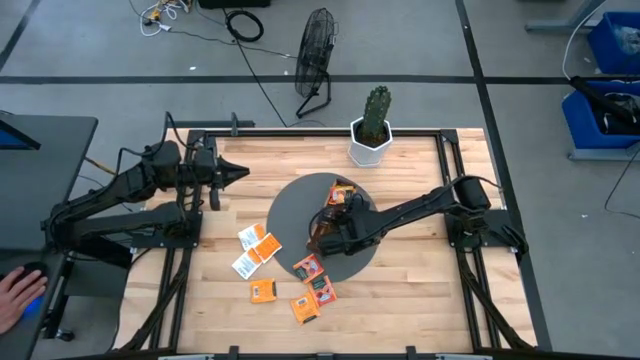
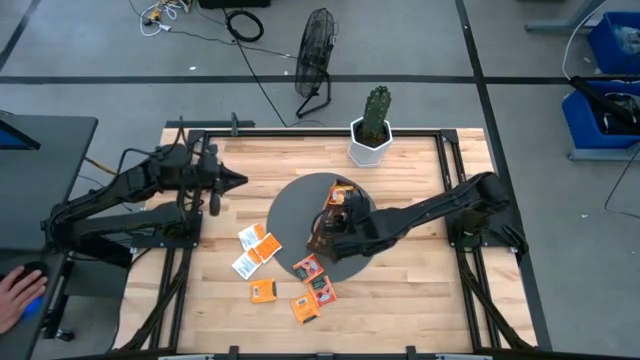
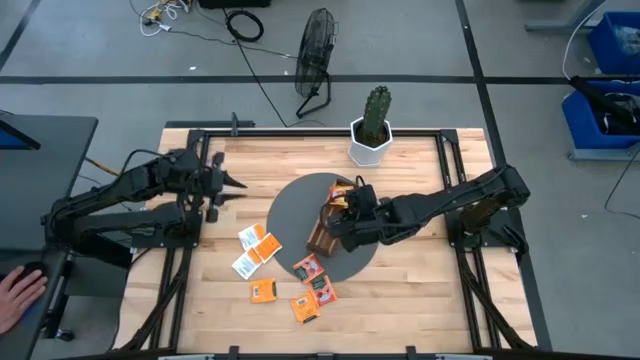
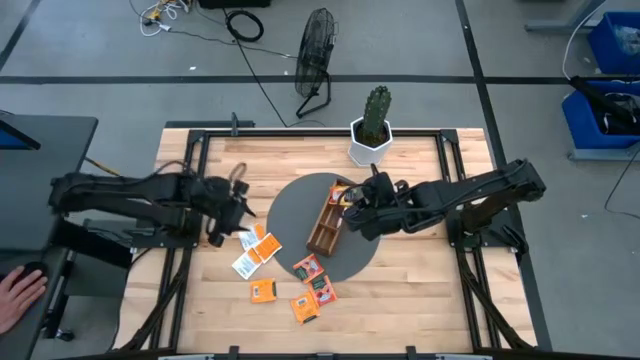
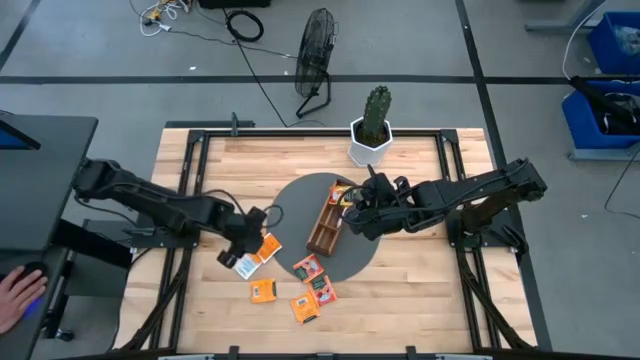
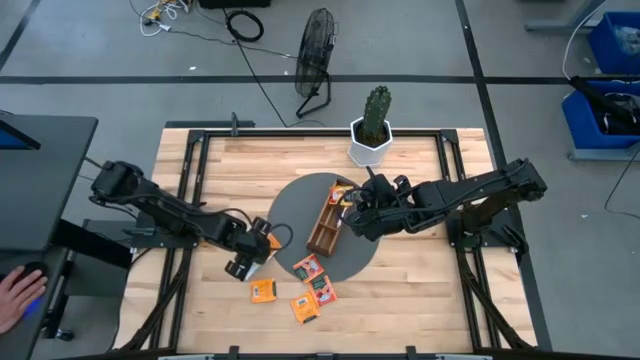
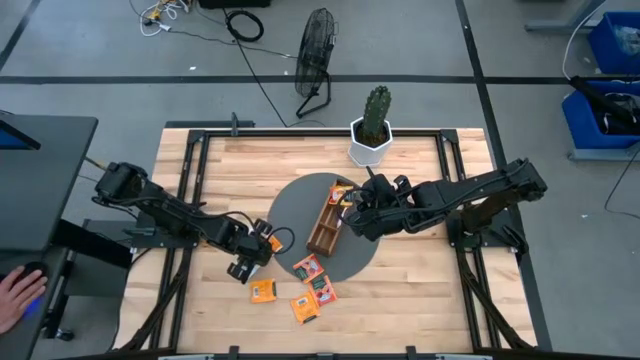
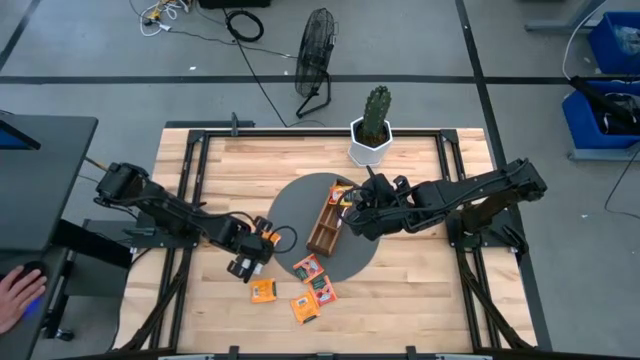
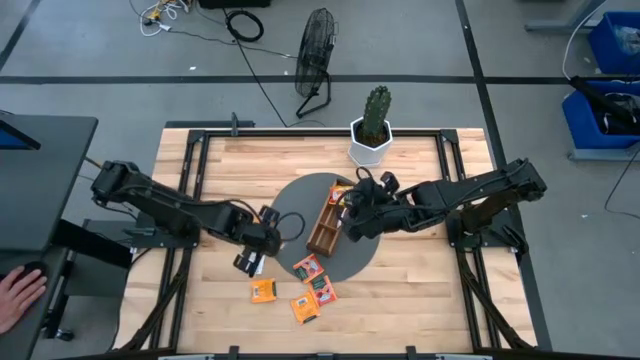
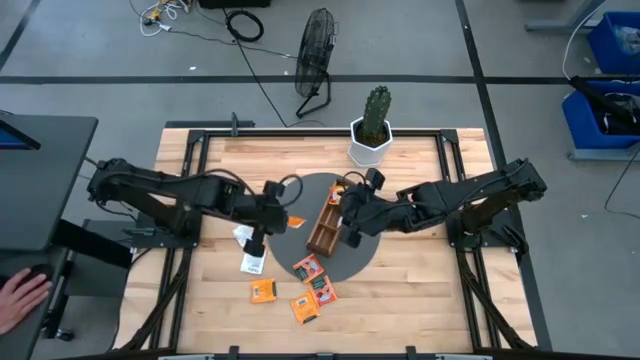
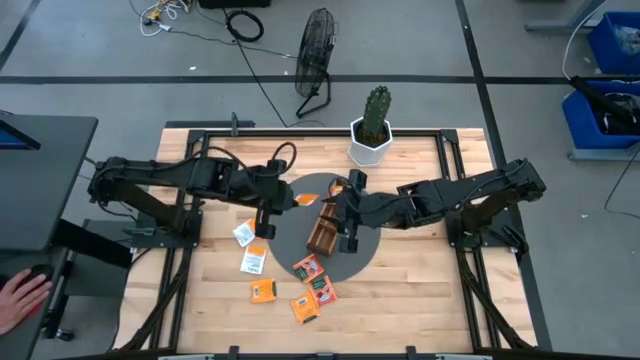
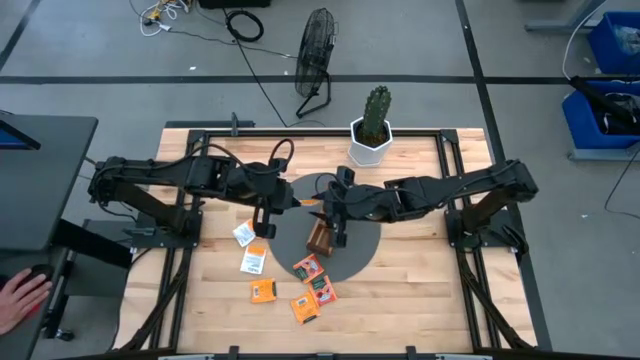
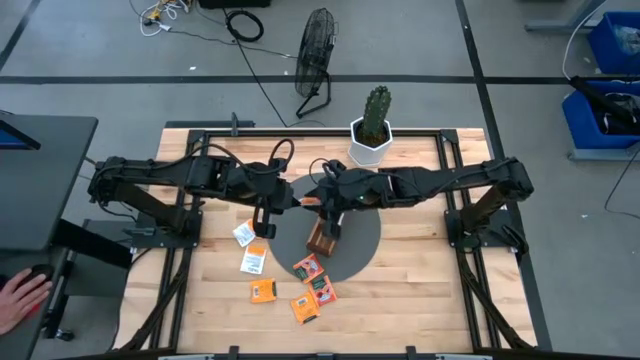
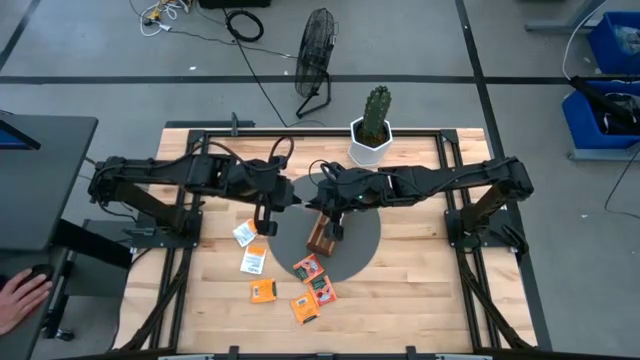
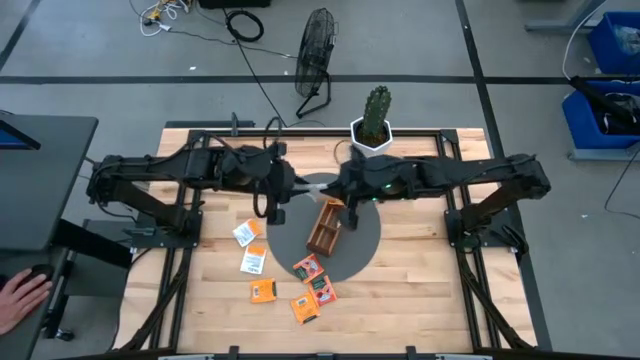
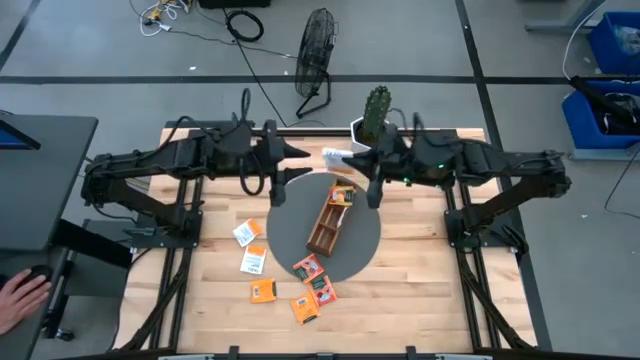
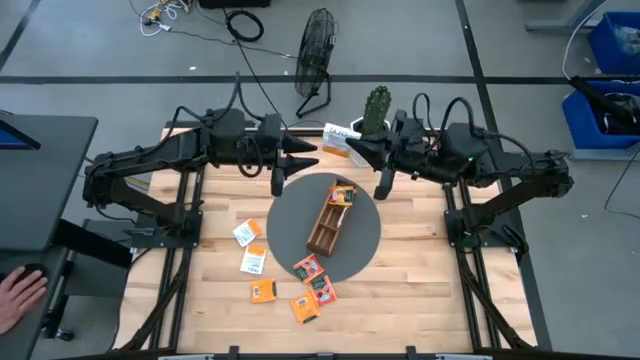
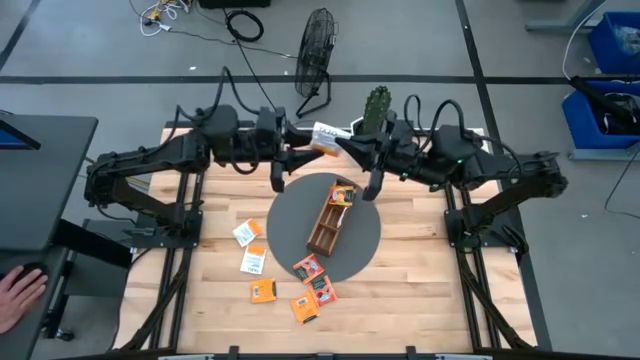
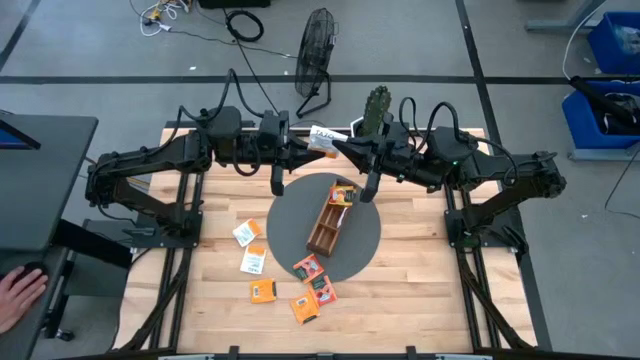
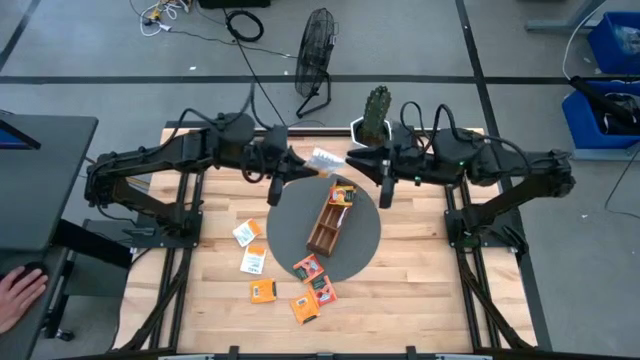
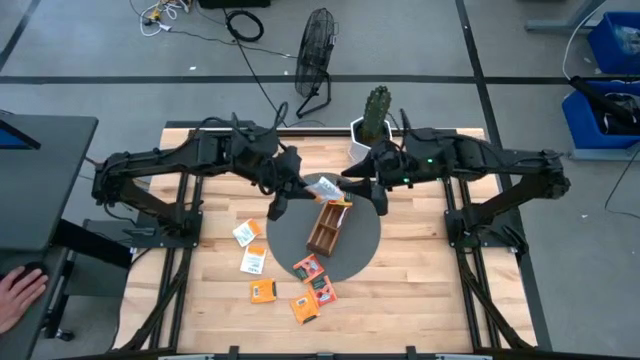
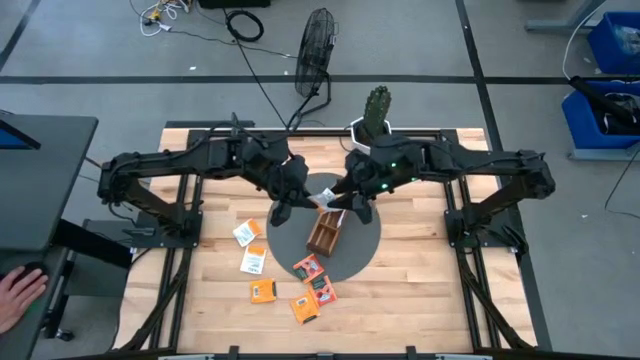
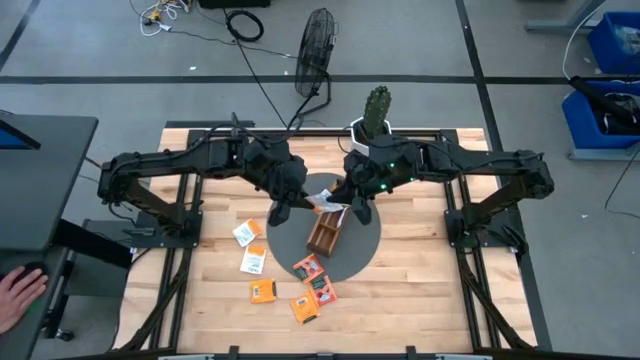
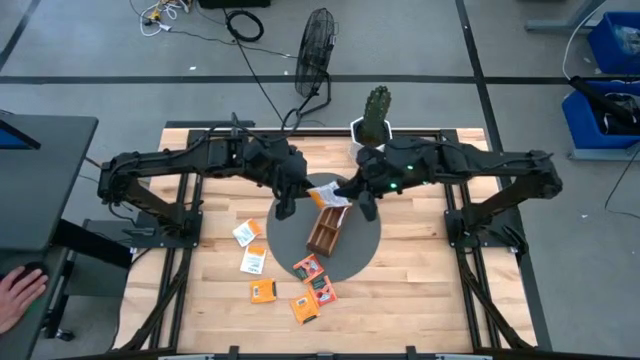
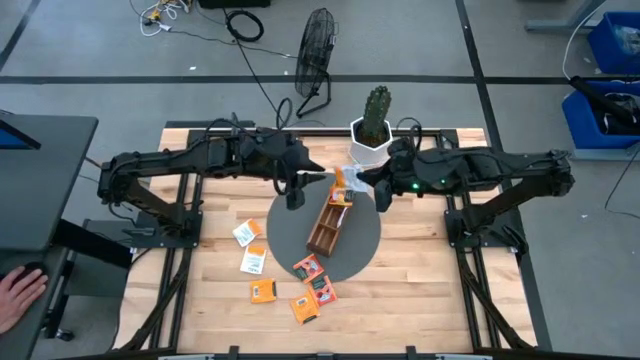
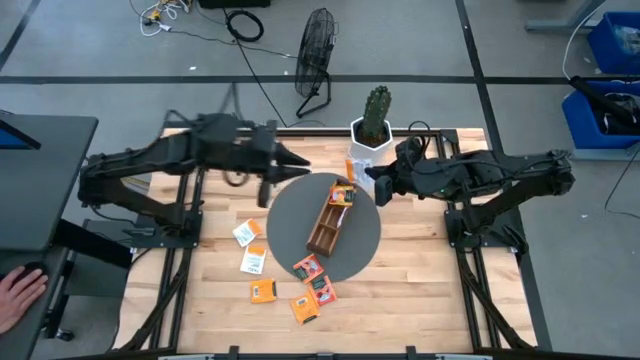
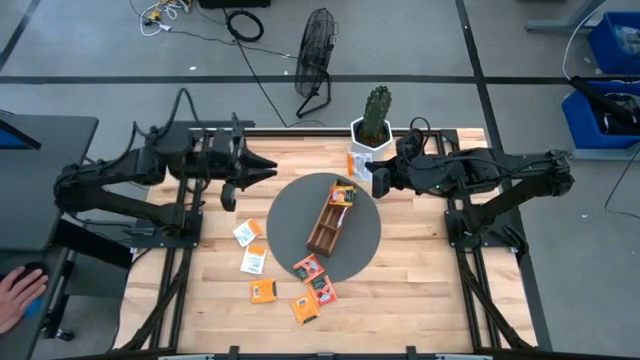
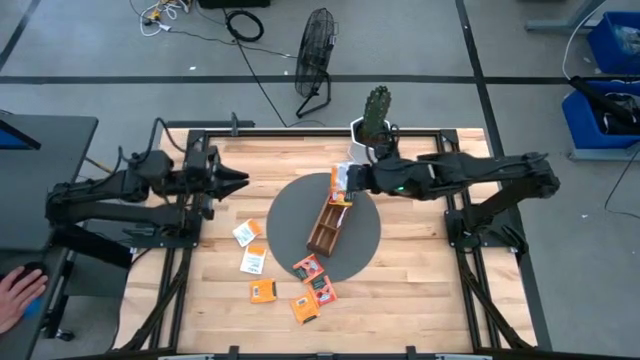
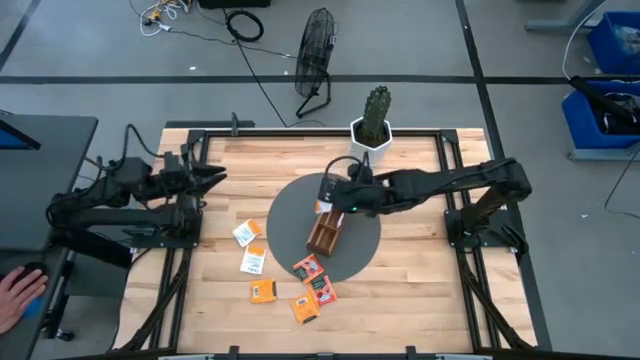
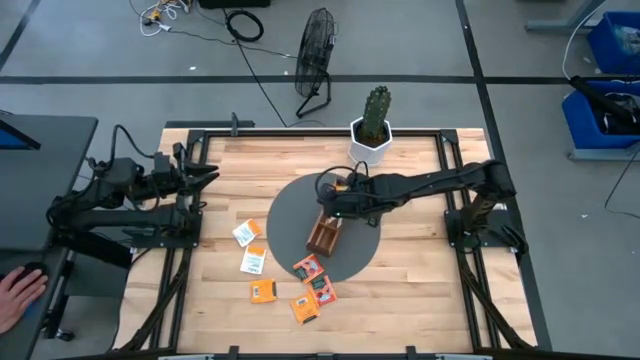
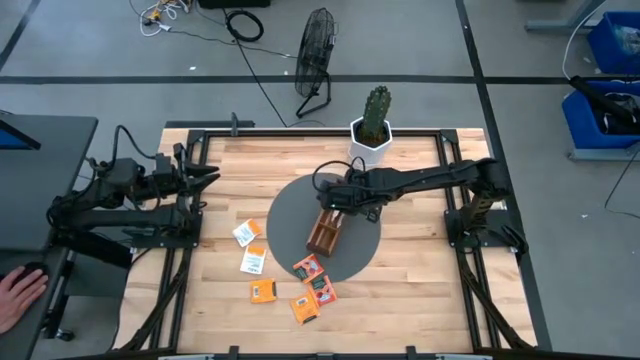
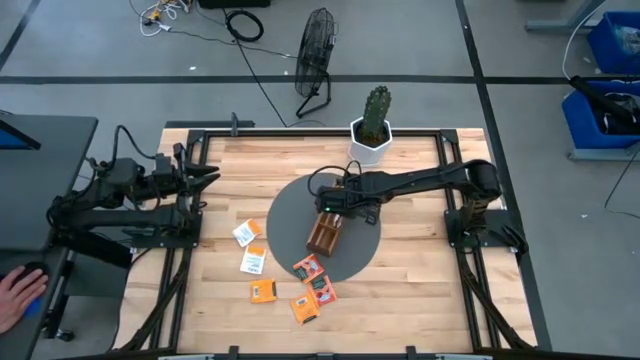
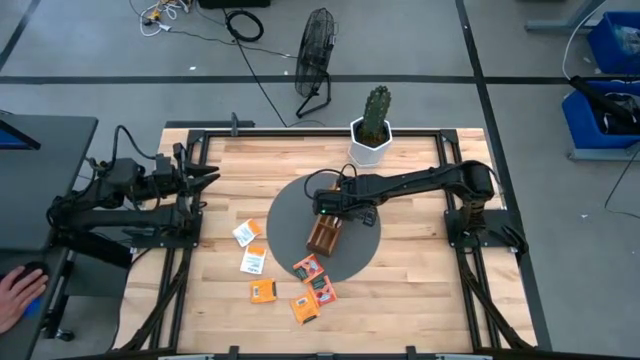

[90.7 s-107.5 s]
Task: Pick & Place Tea
Put the white tea bag into the middle section of the wooden organizer

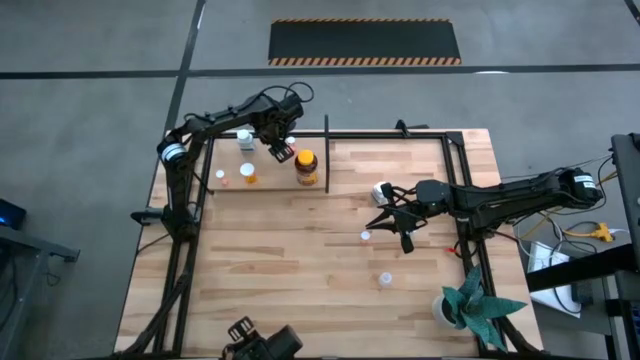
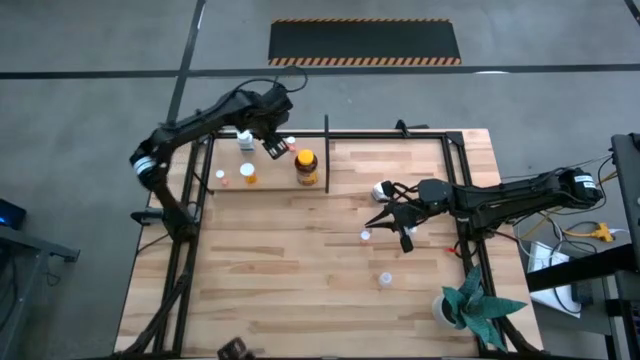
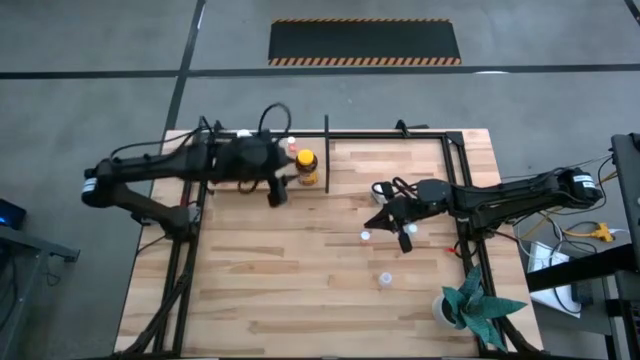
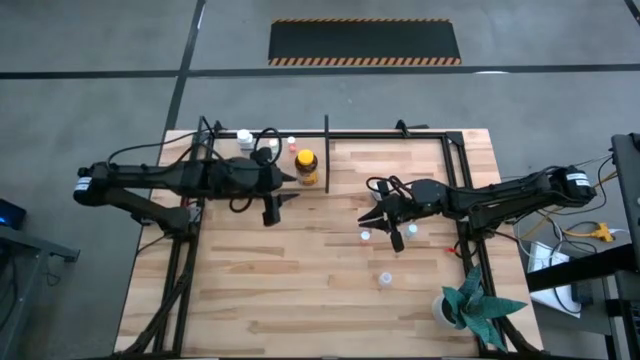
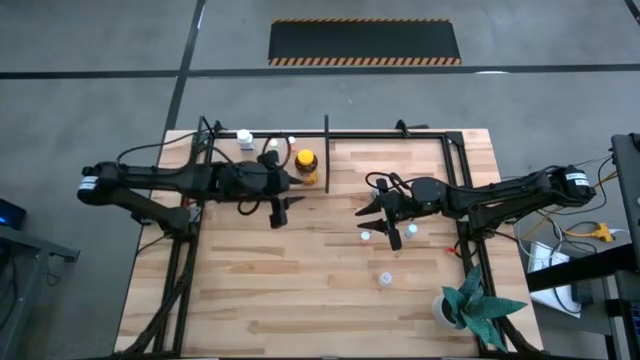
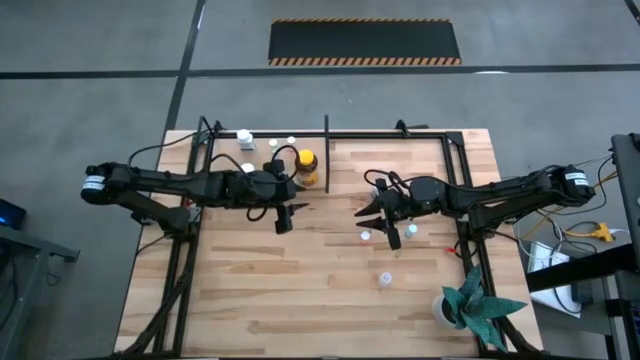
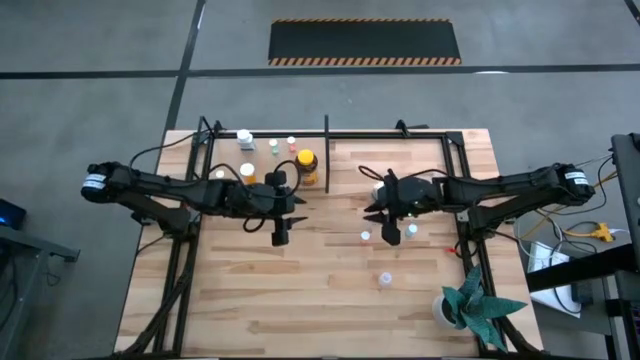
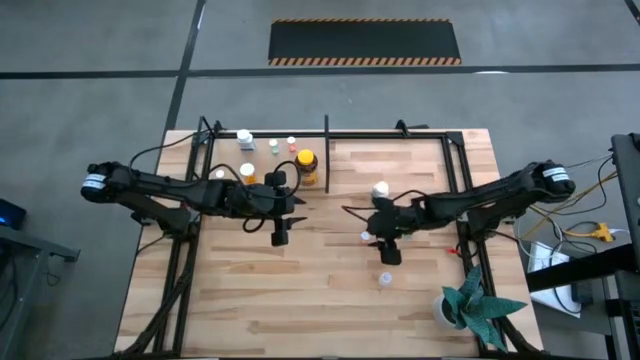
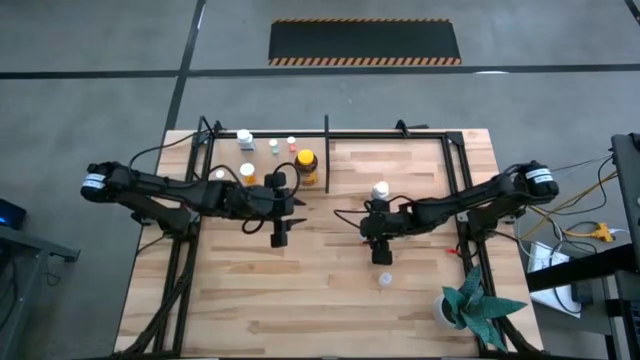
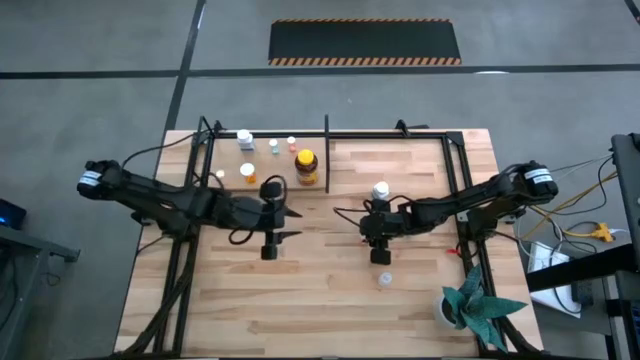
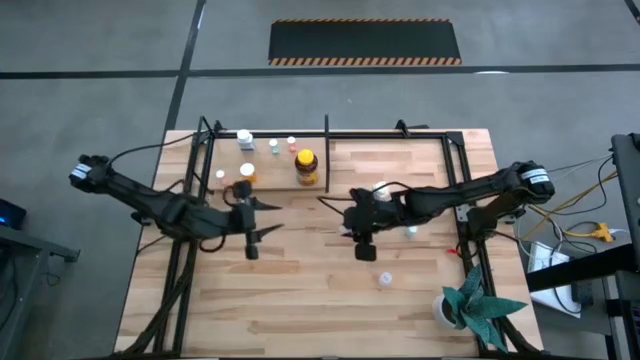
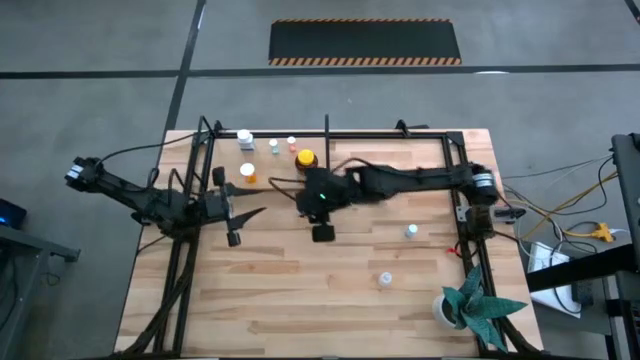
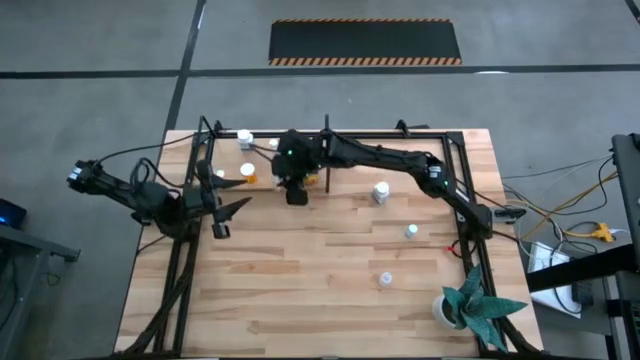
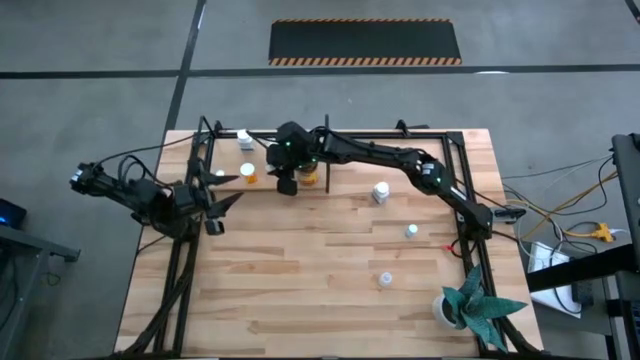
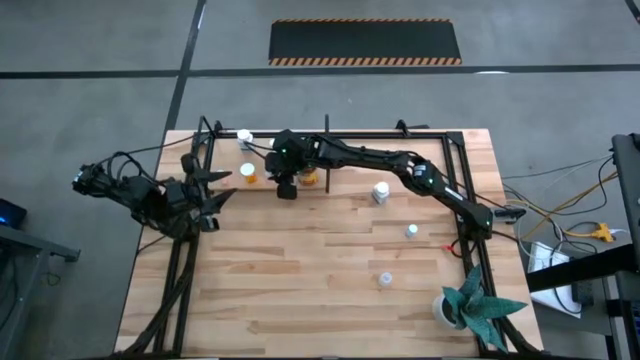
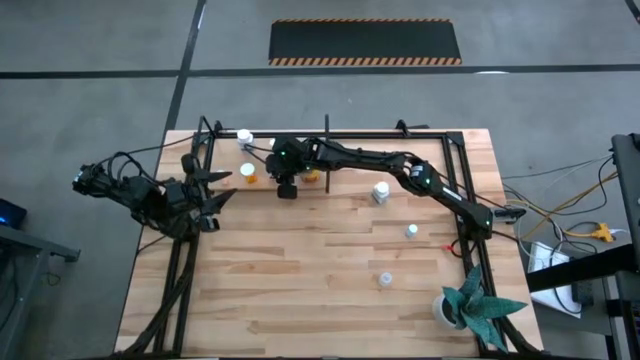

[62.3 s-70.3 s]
Task: Pick and place medicine bottles onto shelf by color
Put the pink pill bottle on the shelf
